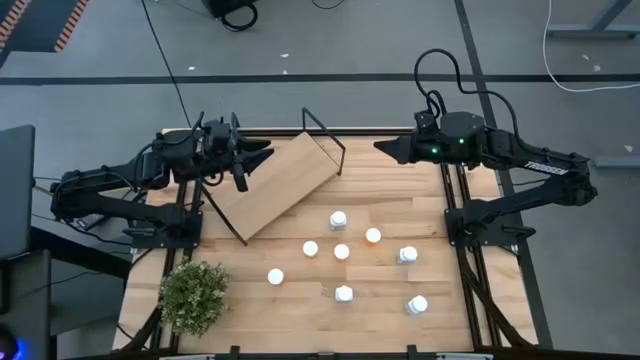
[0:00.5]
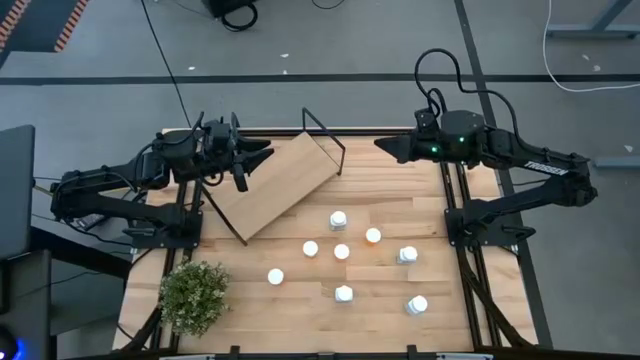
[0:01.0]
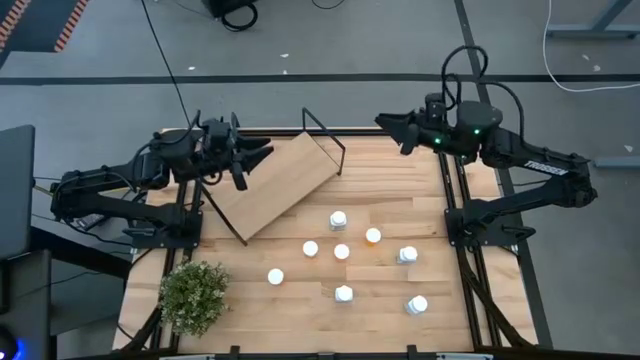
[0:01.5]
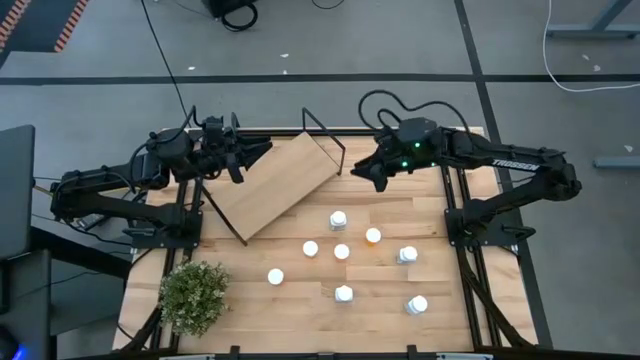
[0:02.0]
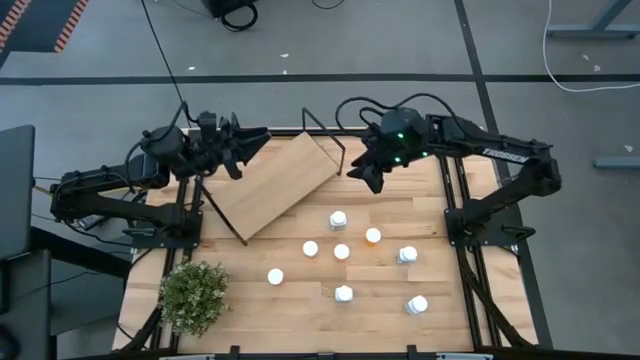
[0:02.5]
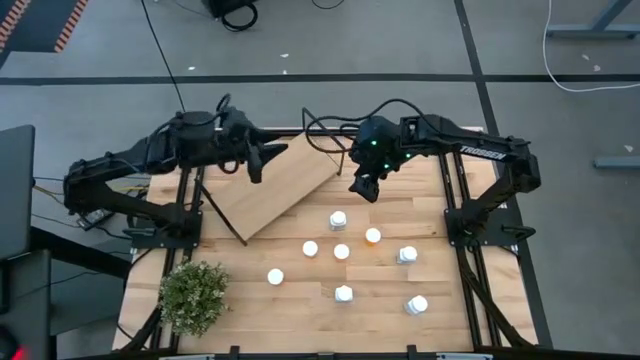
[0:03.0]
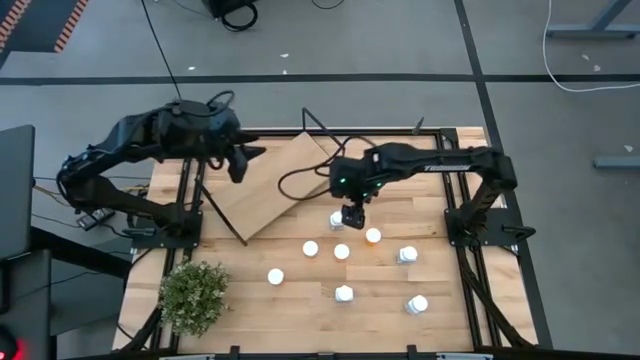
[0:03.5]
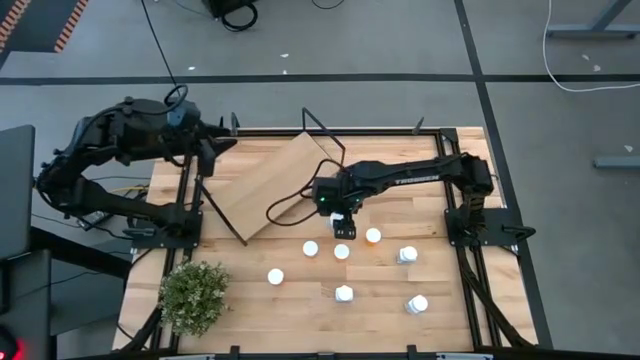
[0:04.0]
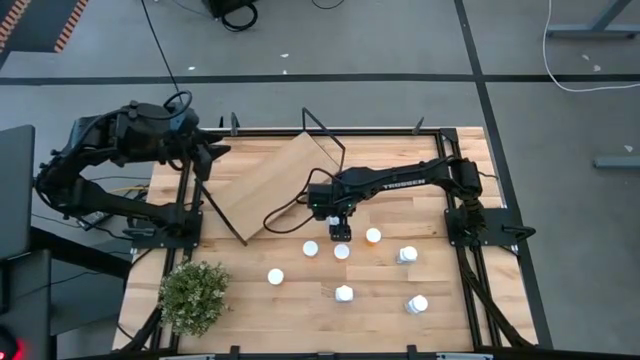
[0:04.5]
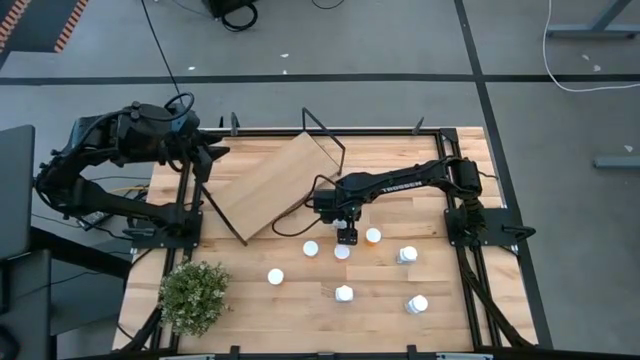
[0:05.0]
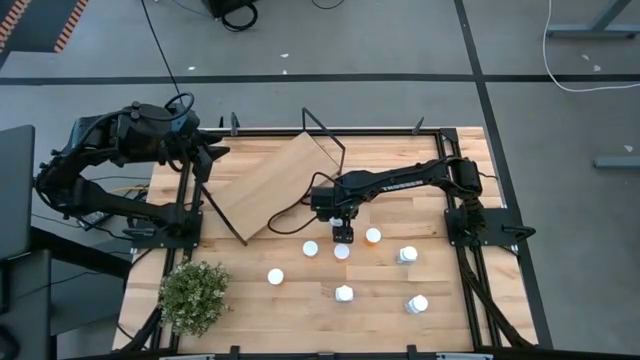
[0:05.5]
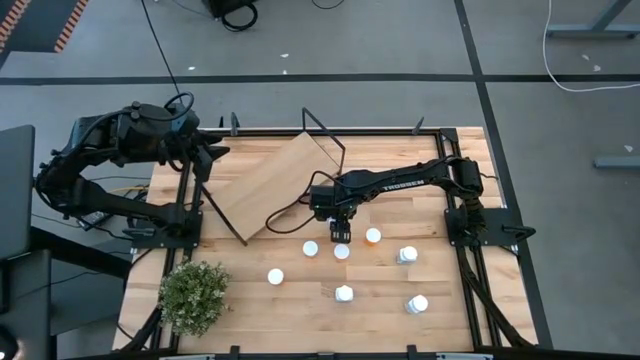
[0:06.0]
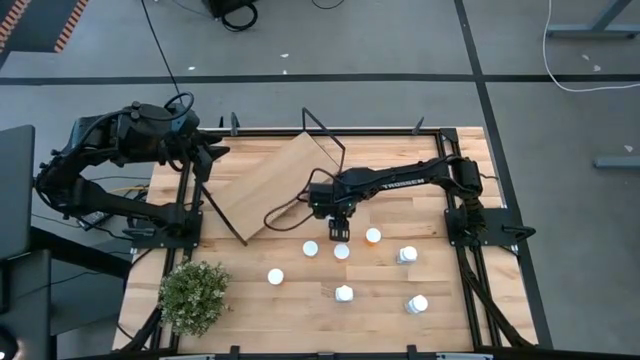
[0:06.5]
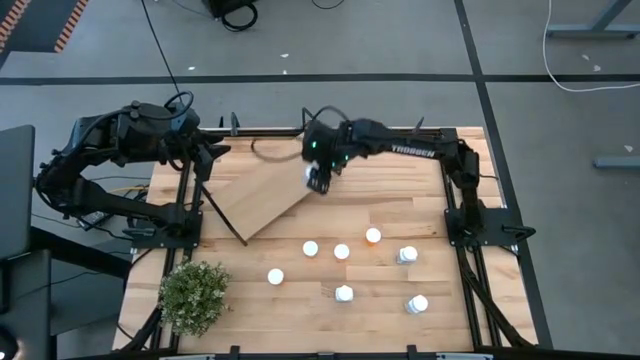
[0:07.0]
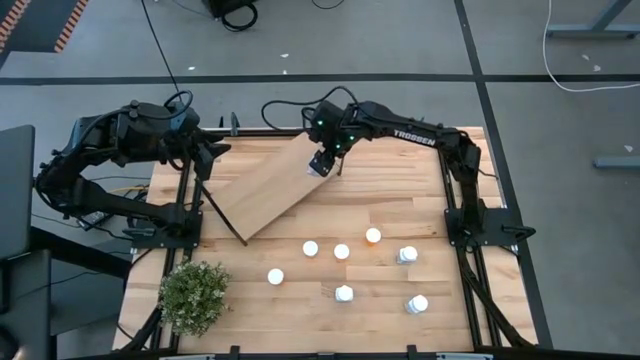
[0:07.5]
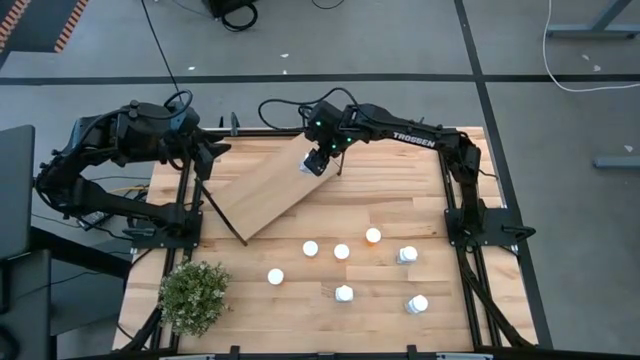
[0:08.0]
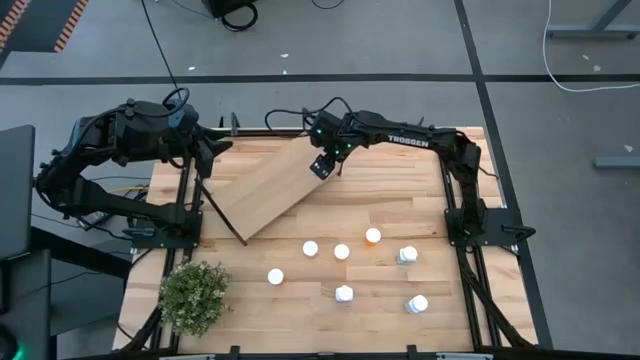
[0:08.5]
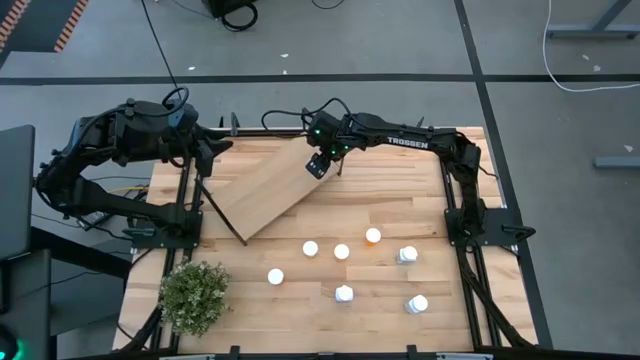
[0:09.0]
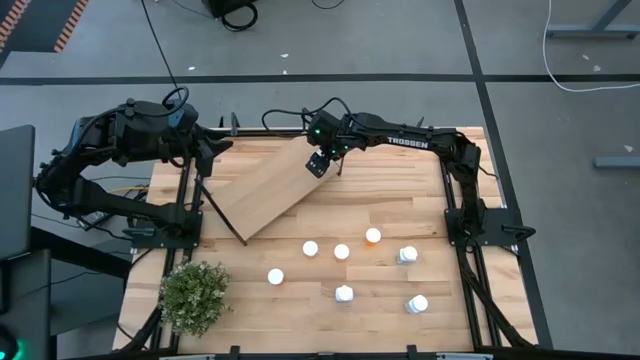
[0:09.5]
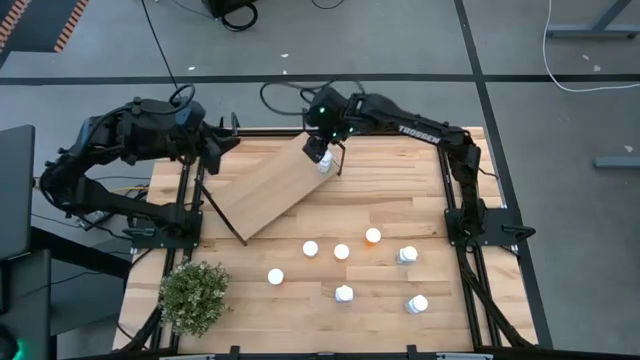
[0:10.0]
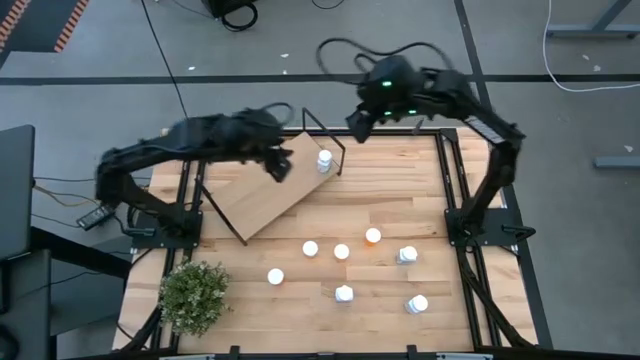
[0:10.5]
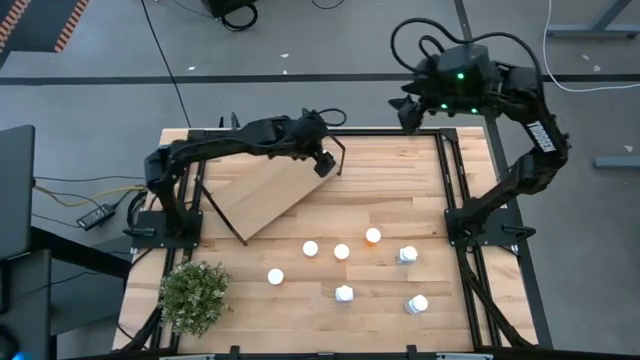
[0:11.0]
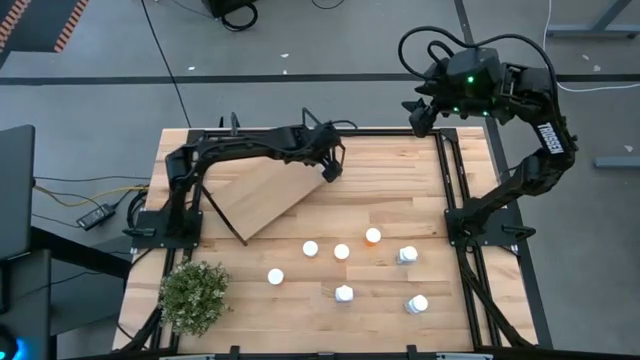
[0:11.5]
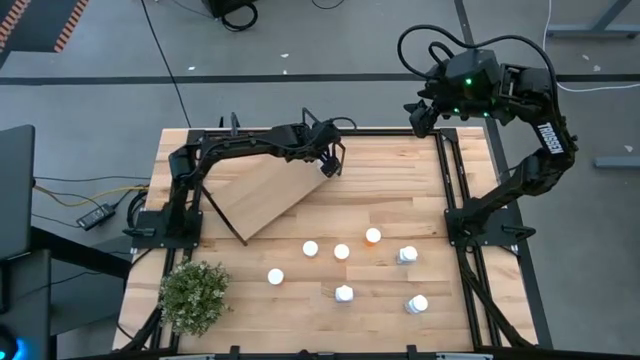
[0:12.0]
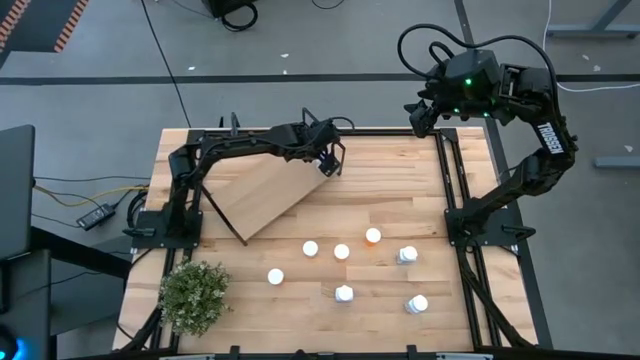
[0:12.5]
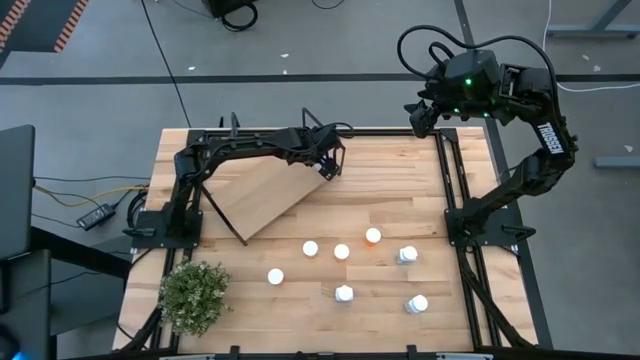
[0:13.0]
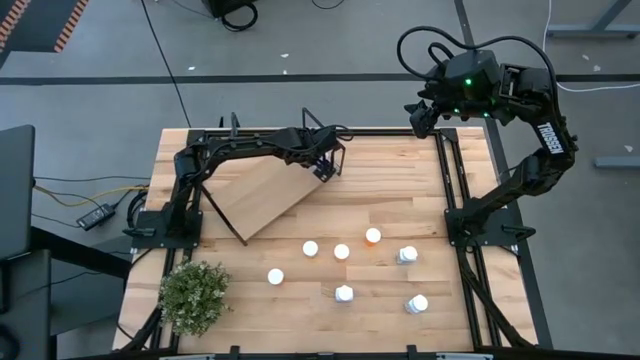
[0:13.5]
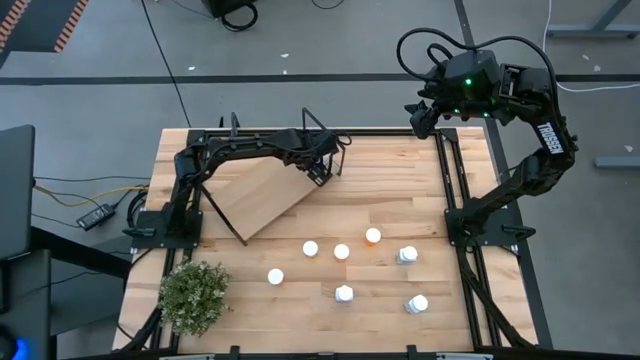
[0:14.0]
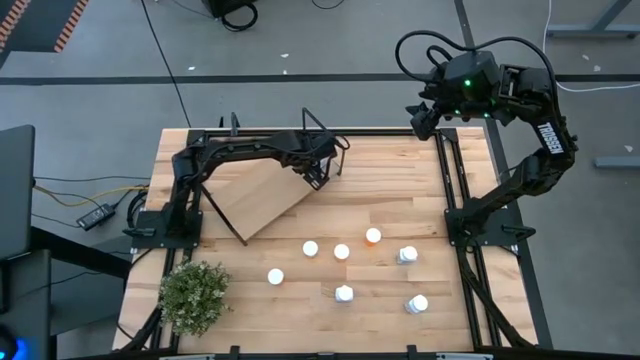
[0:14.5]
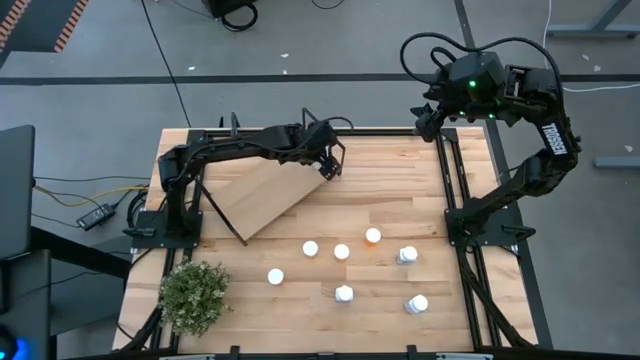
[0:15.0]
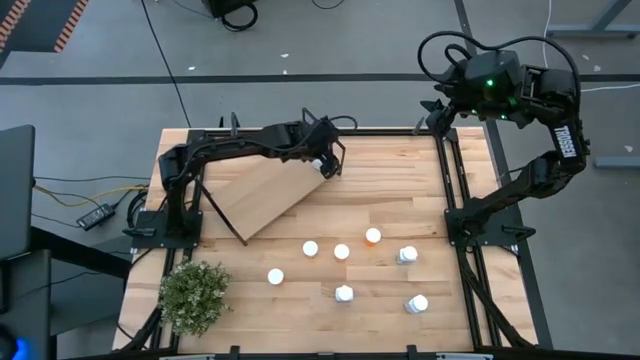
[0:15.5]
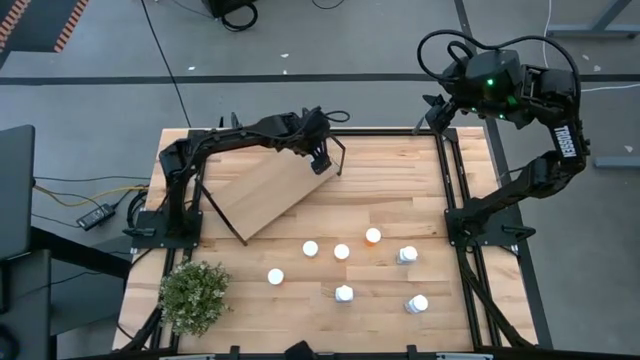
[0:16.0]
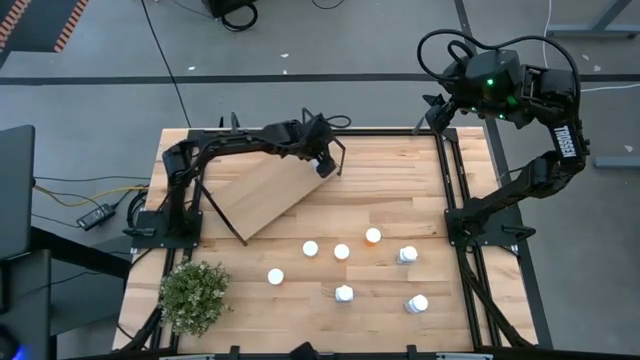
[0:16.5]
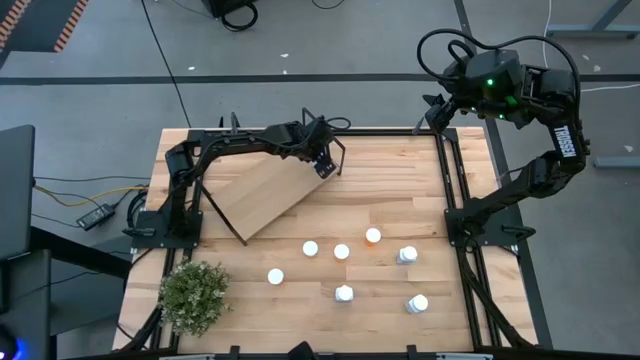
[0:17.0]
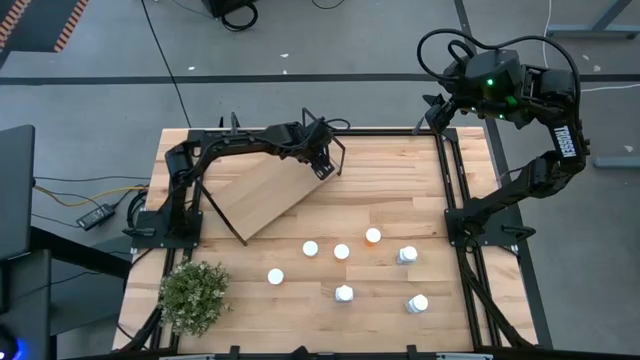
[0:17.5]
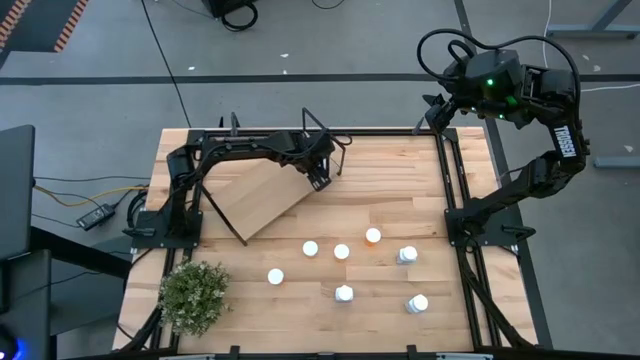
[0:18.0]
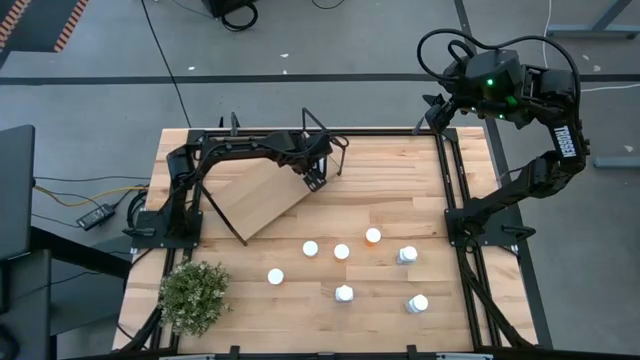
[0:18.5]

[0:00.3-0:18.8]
Task: Pick and place medicine bottles onto shelf by color
Put the white pill bottle on the shelf
